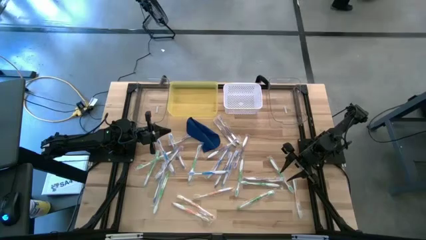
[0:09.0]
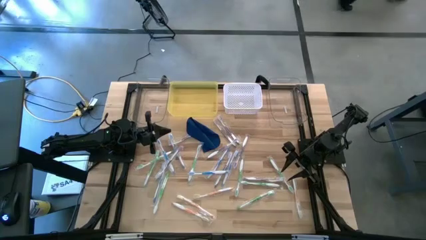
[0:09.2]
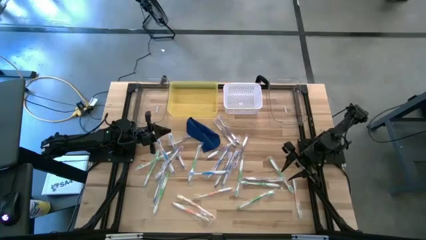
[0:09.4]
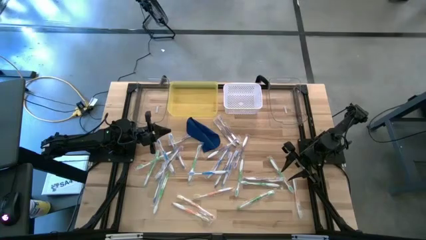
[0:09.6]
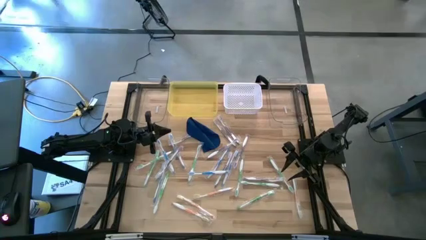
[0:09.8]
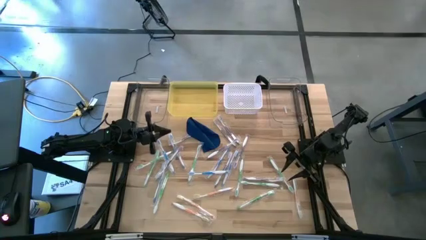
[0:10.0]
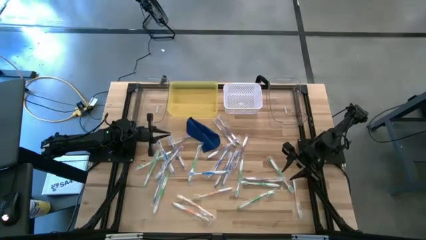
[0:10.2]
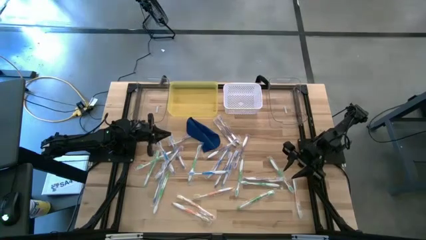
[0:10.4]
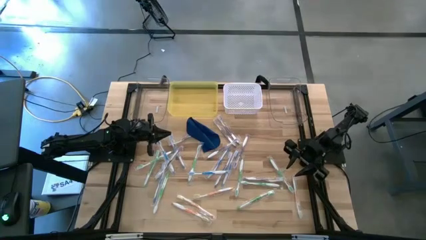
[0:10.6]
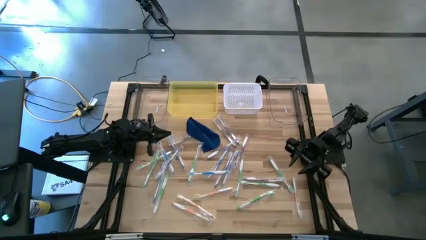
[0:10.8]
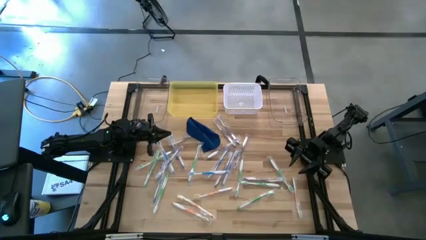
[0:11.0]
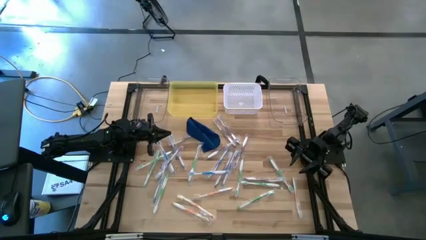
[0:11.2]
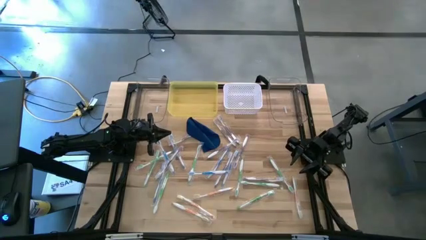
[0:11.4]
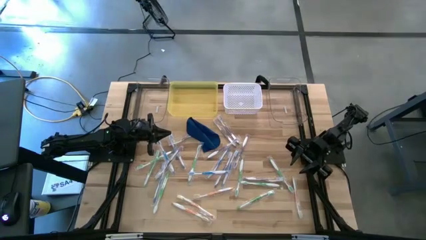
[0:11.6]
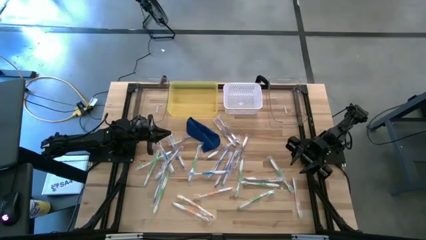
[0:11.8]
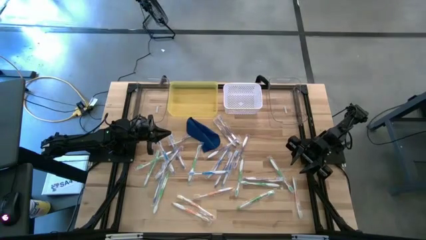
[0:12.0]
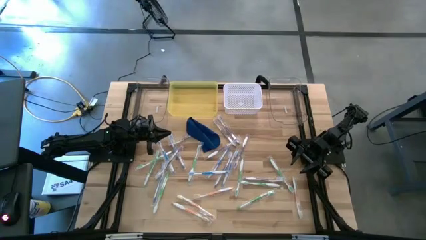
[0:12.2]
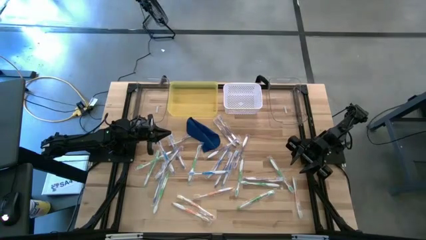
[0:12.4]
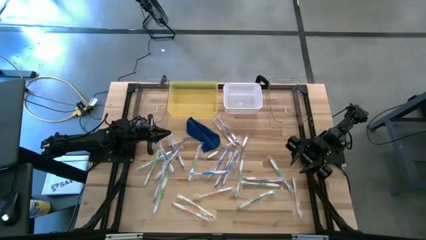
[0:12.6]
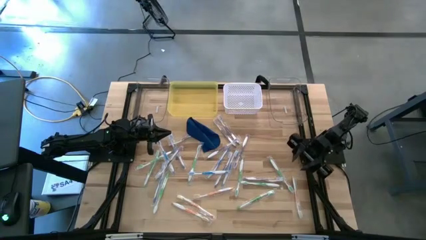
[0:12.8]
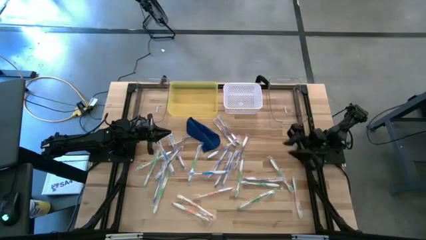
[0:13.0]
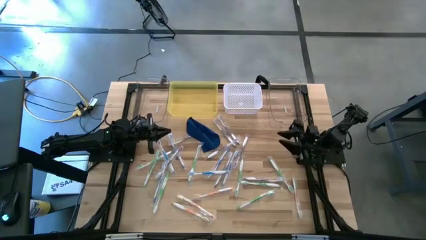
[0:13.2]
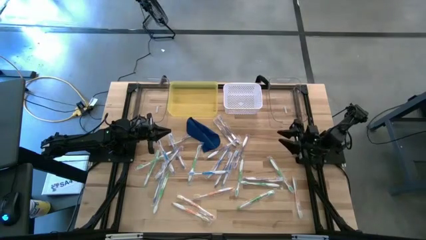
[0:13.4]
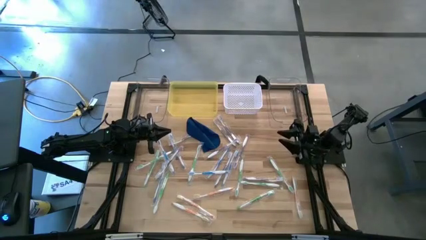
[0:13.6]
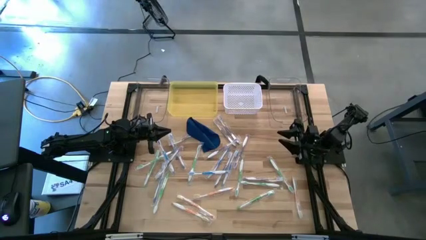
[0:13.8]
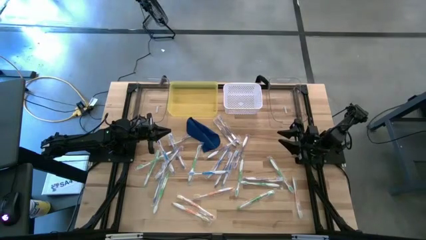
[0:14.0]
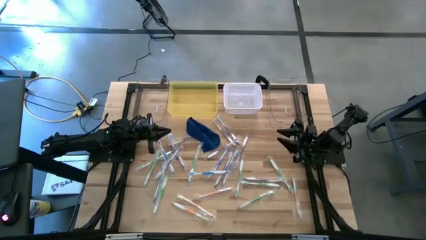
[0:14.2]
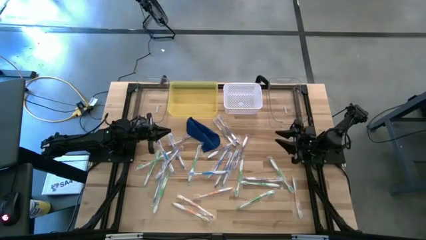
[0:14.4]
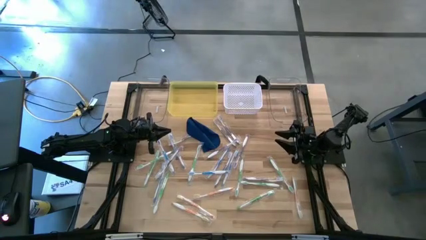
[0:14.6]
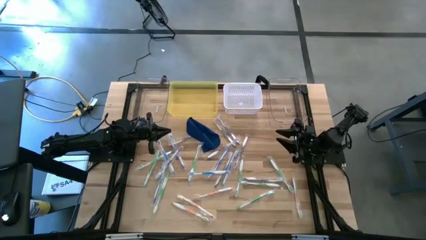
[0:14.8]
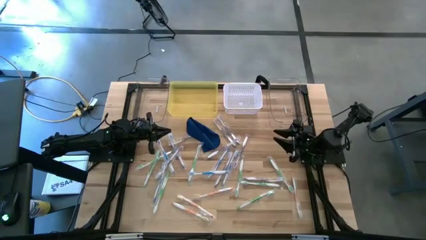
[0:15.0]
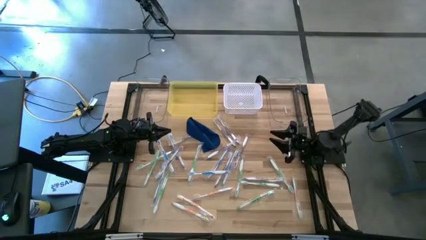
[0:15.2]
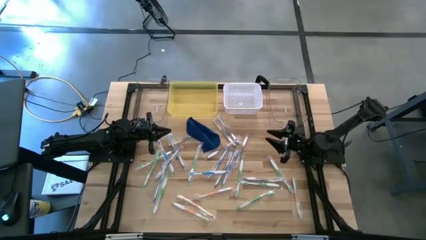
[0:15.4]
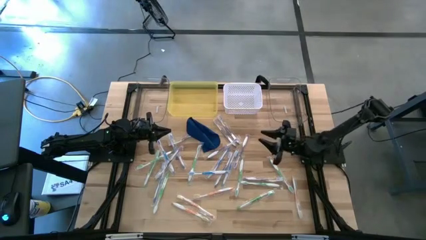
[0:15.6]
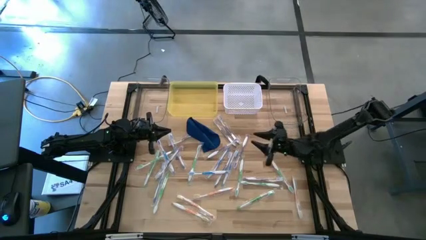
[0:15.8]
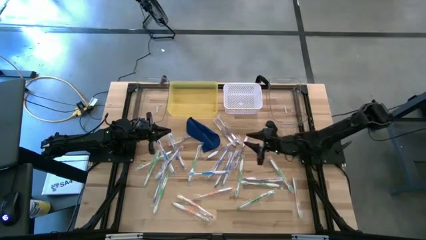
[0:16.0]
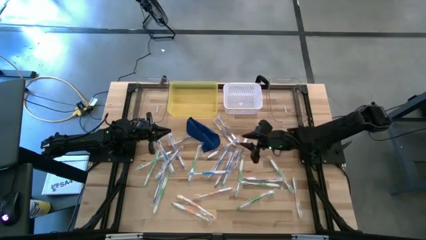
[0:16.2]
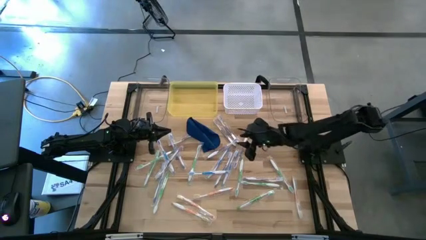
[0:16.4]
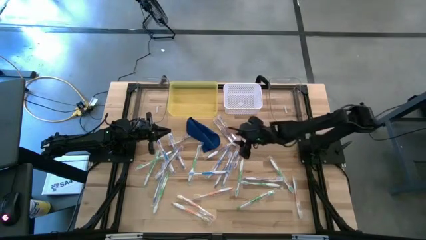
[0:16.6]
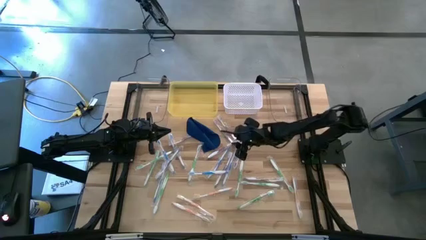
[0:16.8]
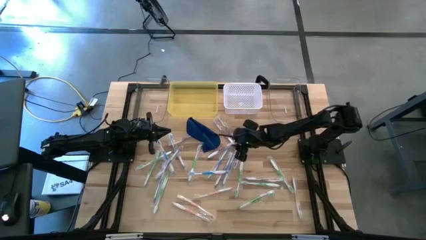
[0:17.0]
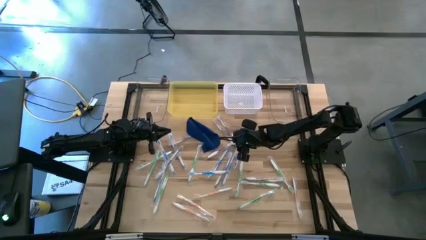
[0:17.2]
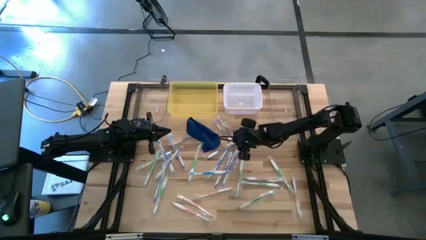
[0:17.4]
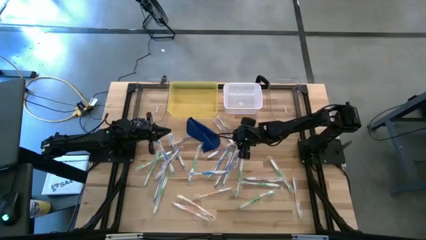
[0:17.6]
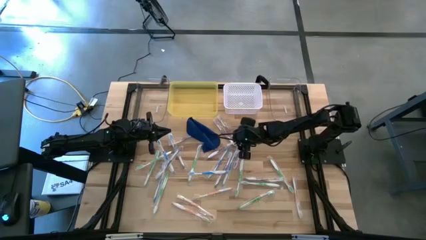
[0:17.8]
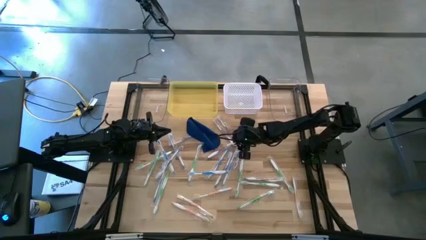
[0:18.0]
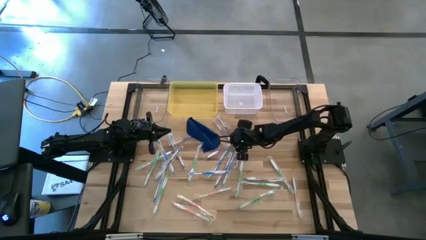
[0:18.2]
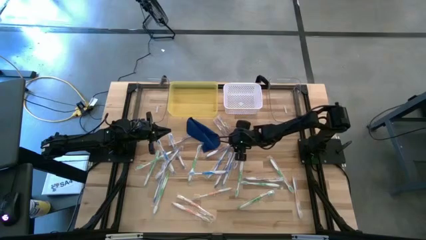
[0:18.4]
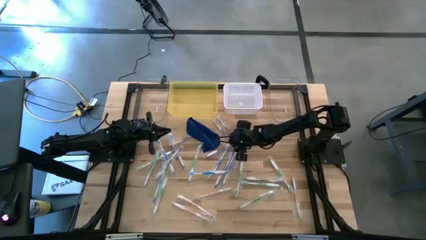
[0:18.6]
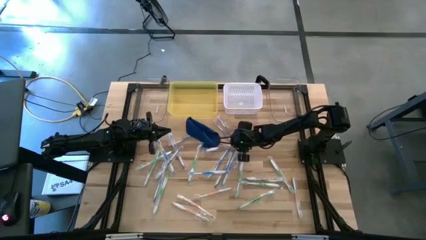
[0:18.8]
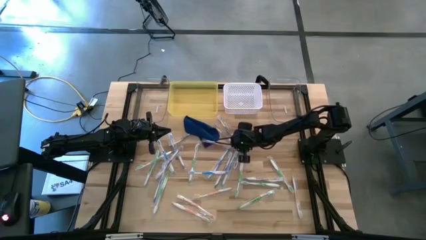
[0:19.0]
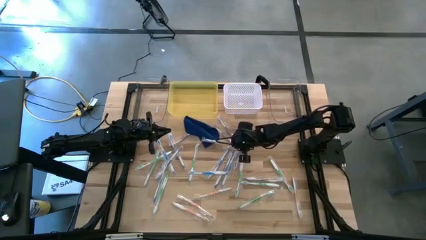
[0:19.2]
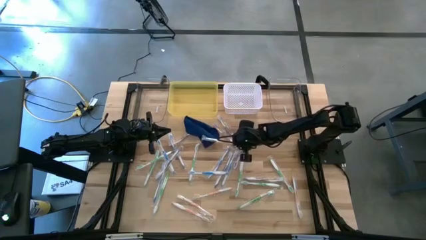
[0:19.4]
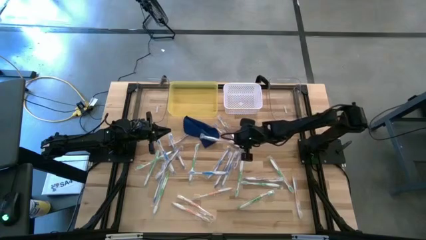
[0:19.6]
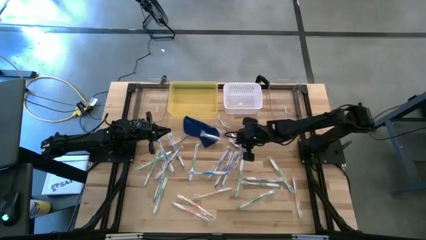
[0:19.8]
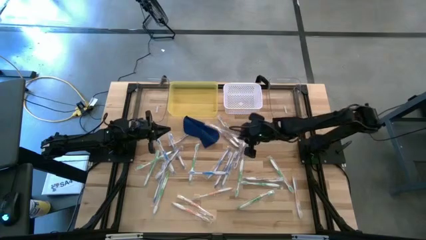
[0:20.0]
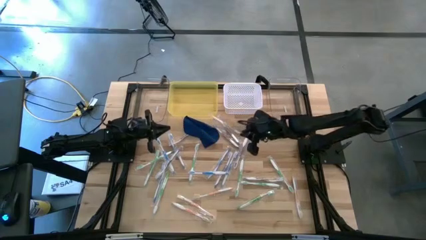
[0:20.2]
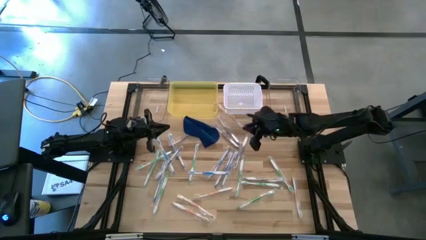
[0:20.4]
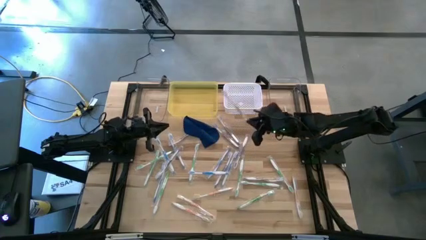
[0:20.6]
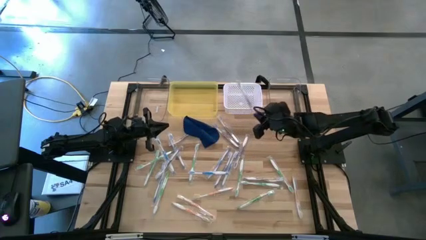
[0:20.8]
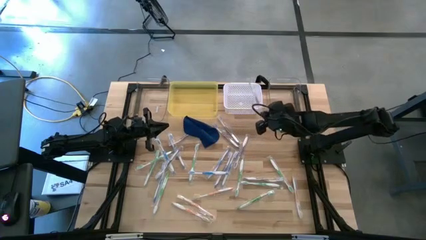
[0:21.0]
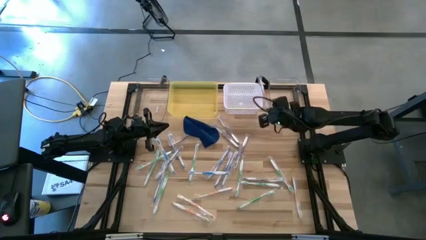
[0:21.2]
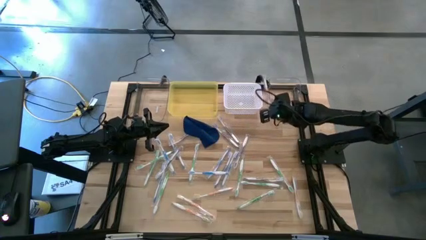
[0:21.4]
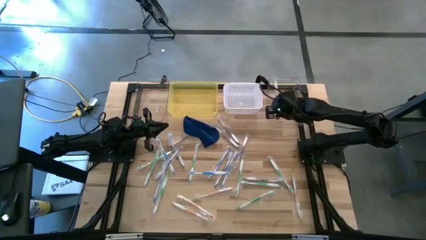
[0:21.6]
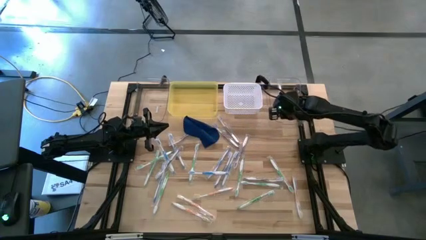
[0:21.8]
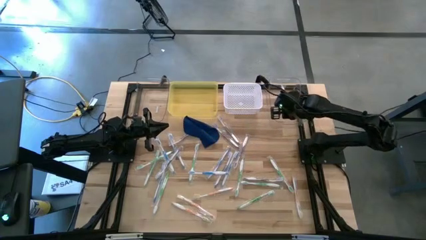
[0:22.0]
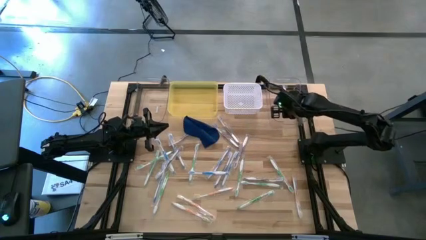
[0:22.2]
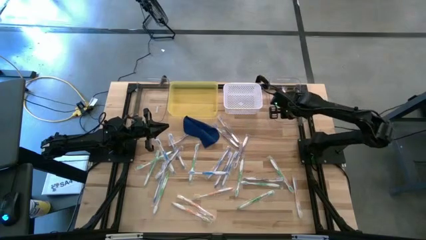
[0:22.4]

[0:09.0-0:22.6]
Task: Pick & Place Toothbrushes
Put the violet toothbrush into the right transparent bin
